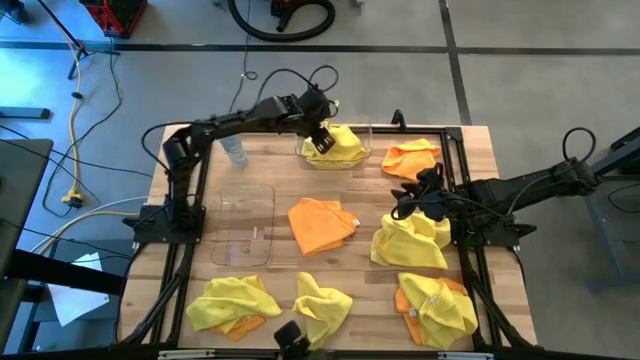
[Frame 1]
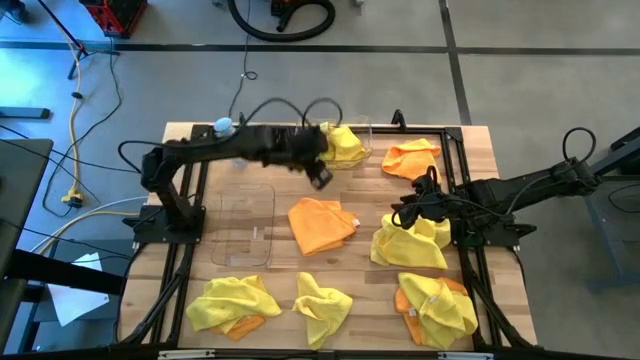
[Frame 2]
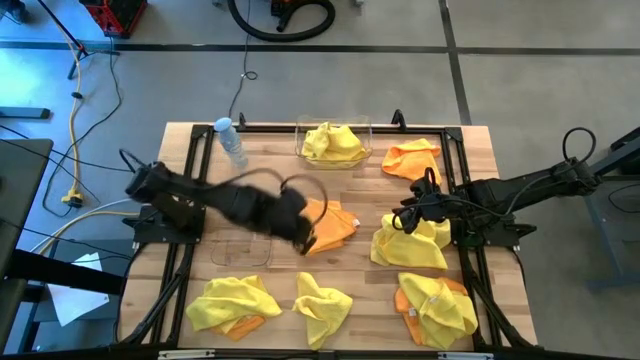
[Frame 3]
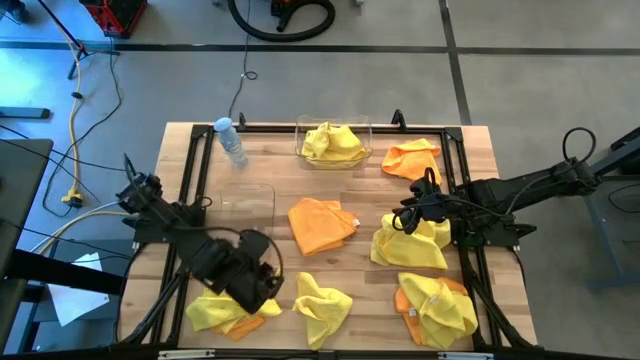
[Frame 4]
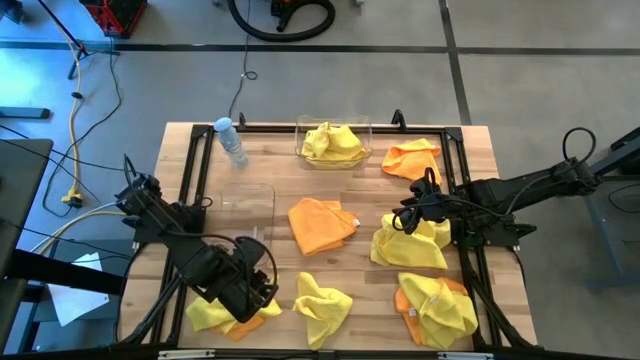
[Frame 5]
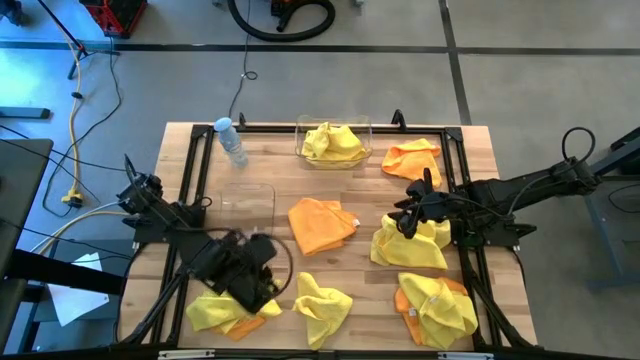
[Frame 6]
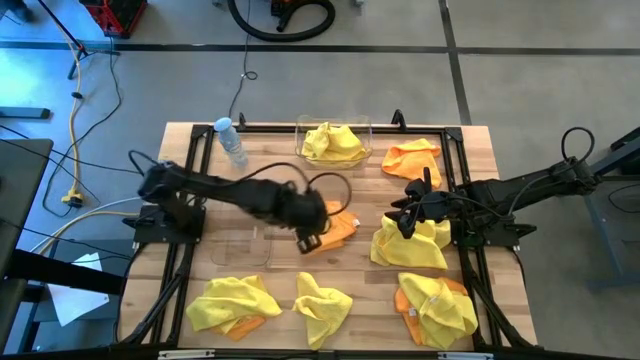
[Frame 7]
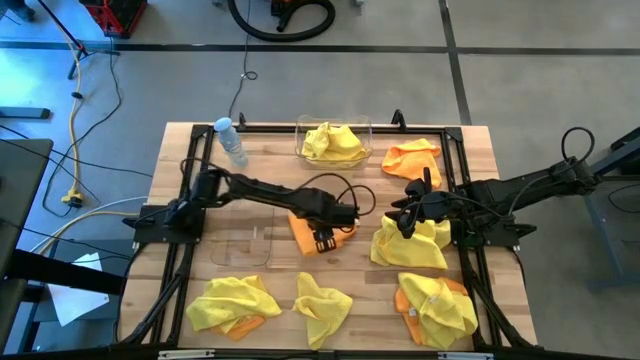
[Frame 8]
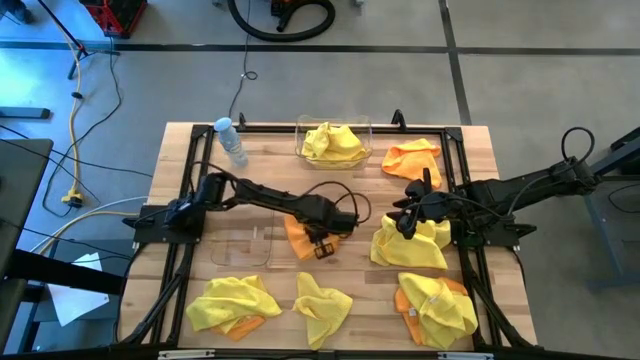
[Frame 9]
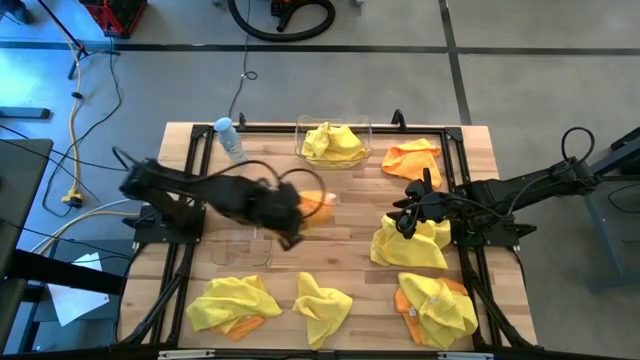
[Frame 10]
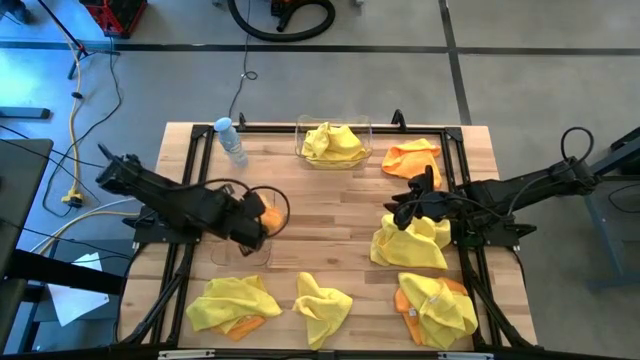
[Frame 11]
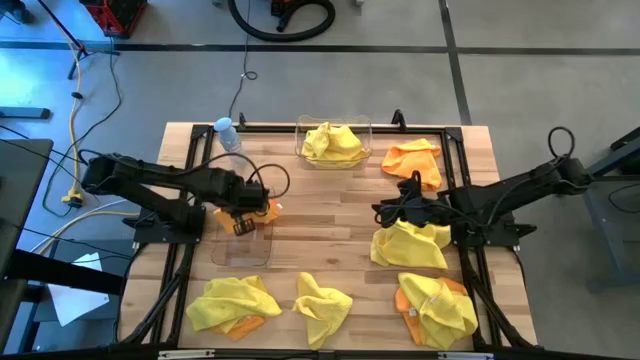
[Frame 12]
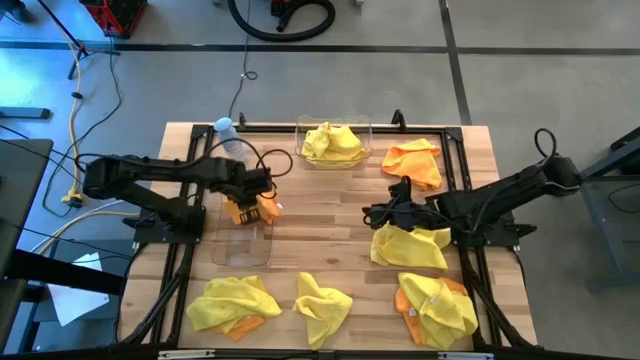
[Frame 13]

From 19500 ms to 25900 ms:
Task: Sort microfiber towel by color & place in baskets
Put the orange microfiber towel into the bottom transparent bin

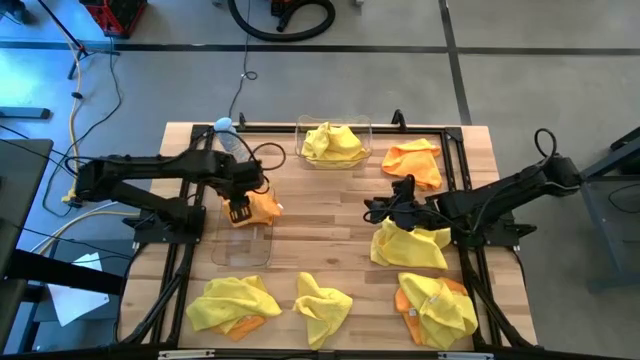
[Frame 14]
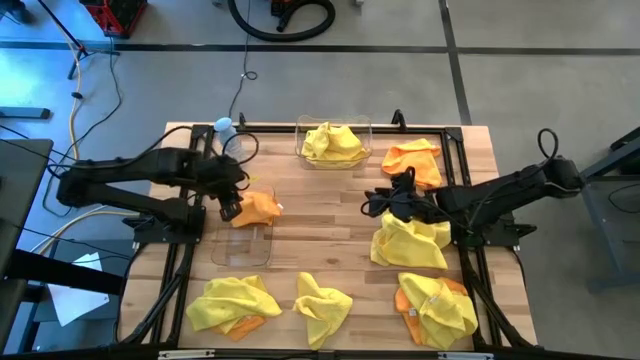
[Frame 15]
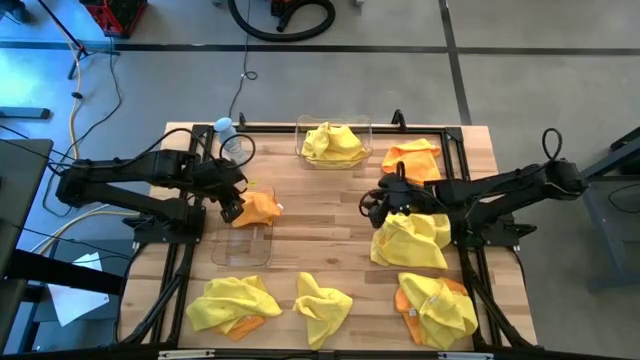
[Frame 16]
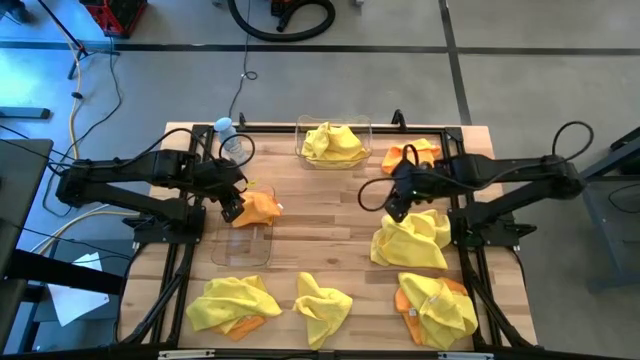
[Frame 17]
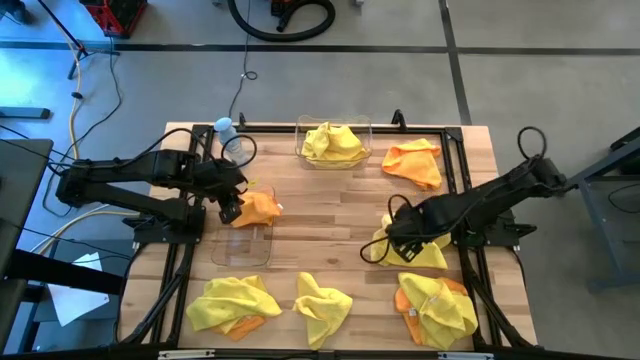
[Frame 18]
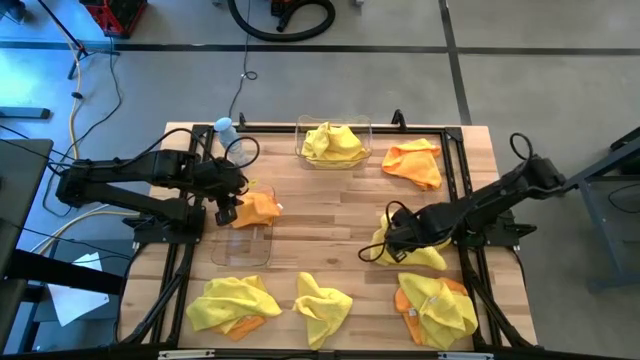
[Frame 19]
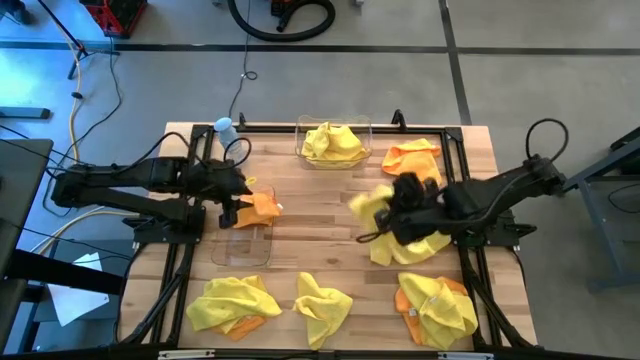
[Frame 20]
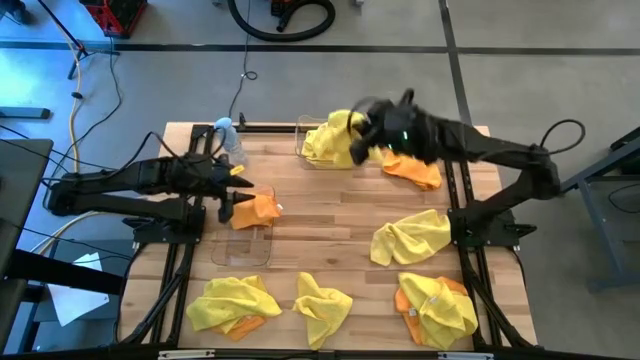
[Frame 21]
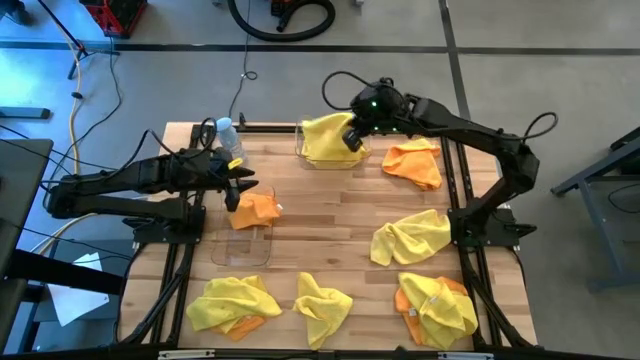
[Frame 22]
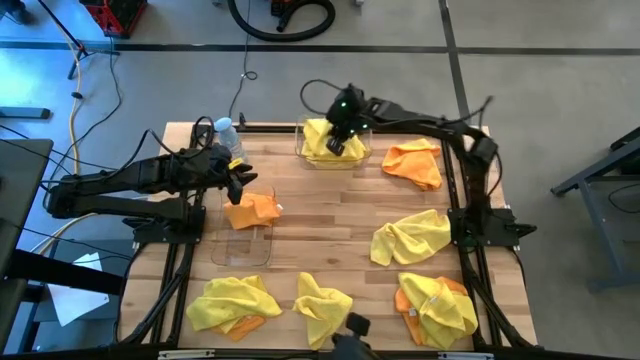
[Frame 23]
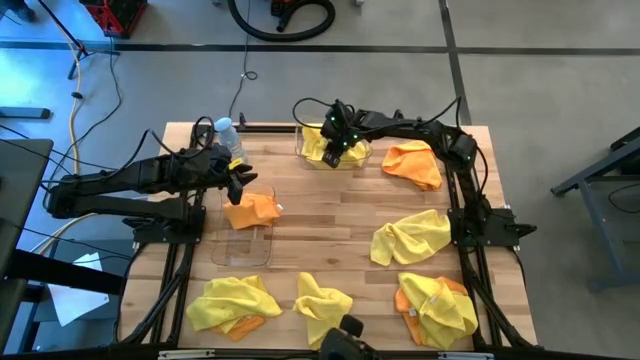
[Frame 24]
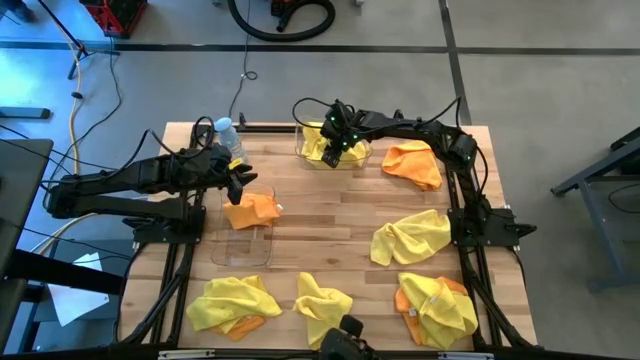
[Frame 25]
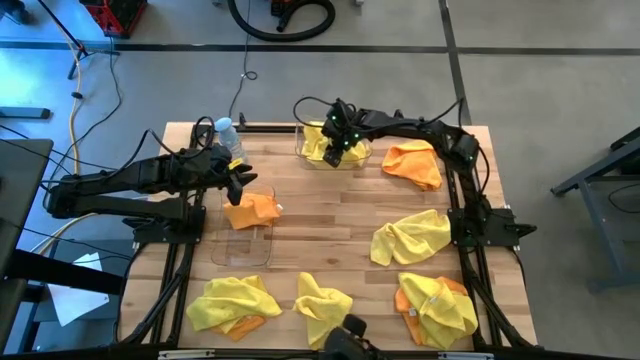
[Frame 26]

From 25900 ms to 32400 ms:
Put the yellow microfiber towel into the top transparent bin

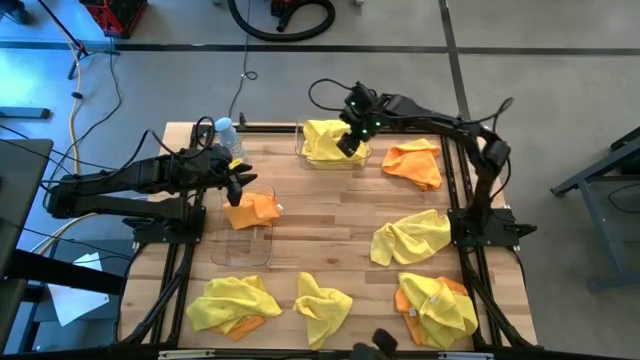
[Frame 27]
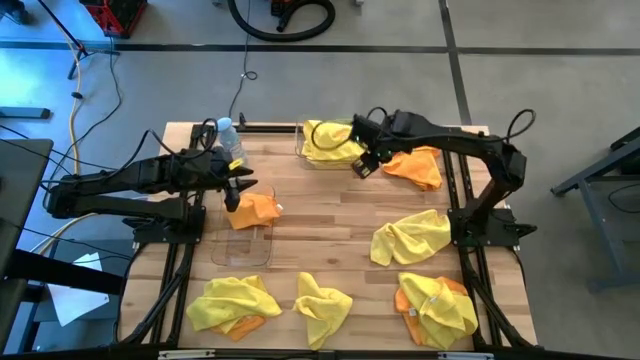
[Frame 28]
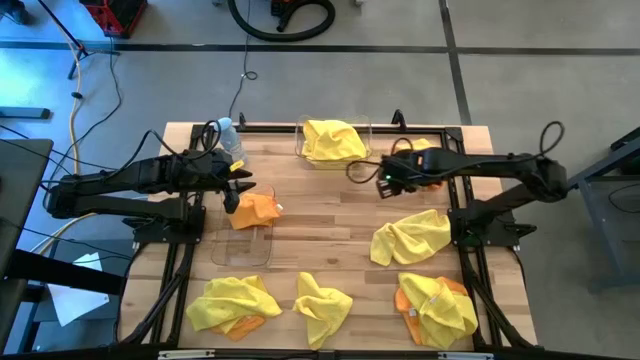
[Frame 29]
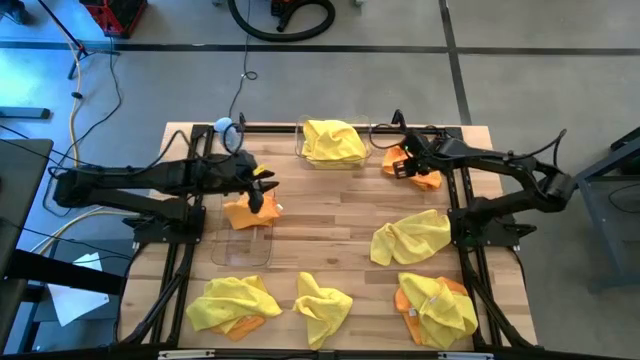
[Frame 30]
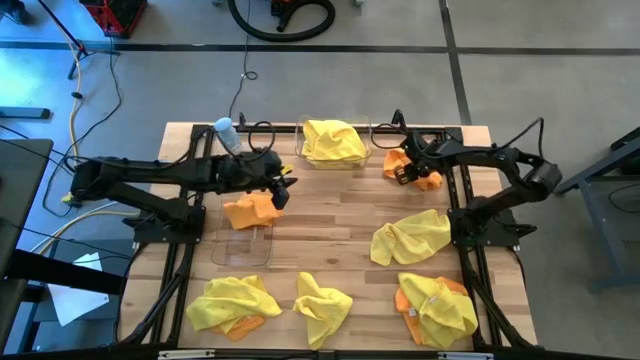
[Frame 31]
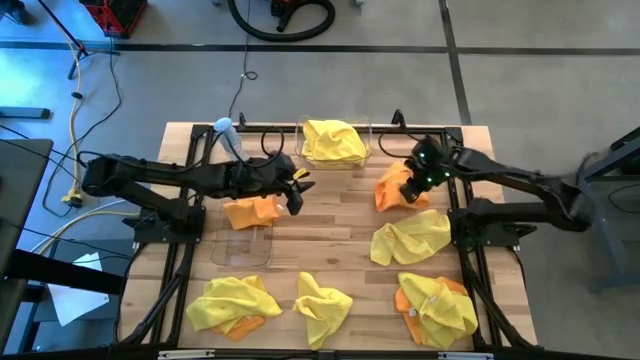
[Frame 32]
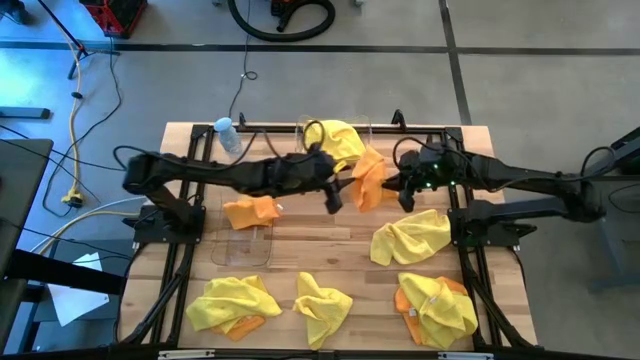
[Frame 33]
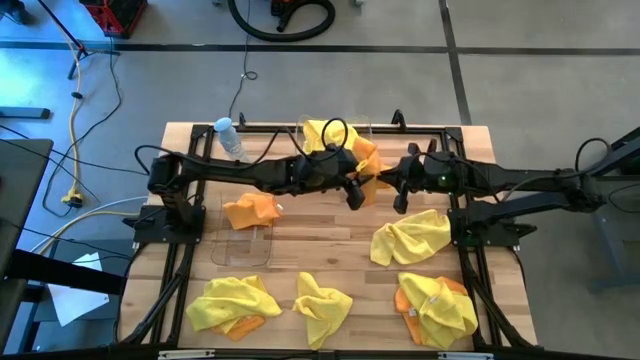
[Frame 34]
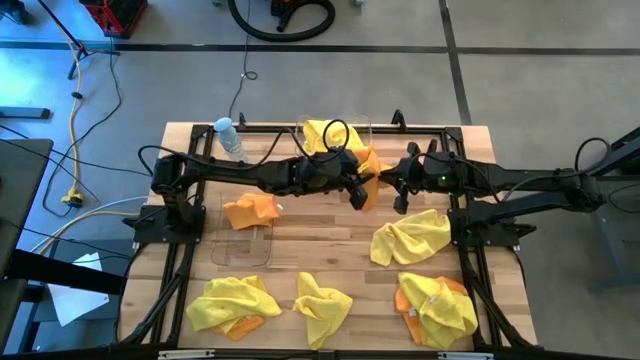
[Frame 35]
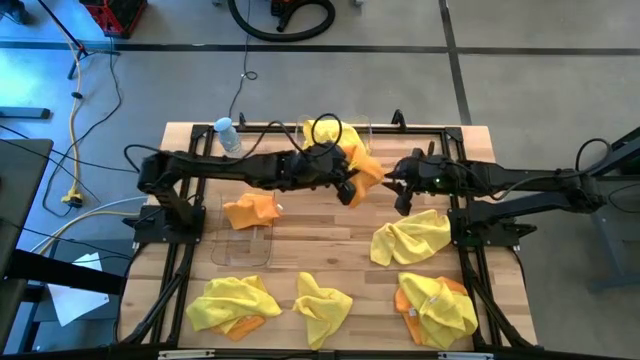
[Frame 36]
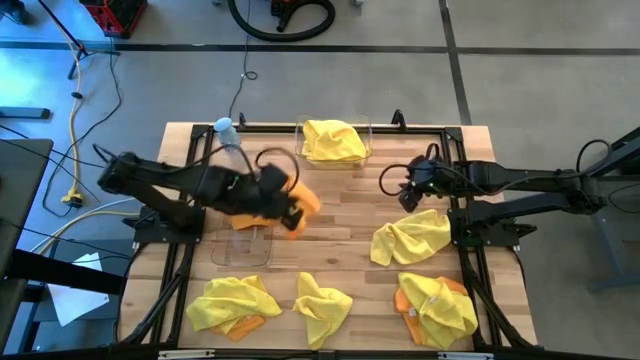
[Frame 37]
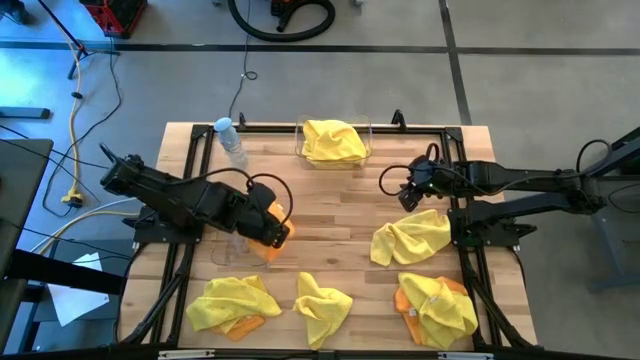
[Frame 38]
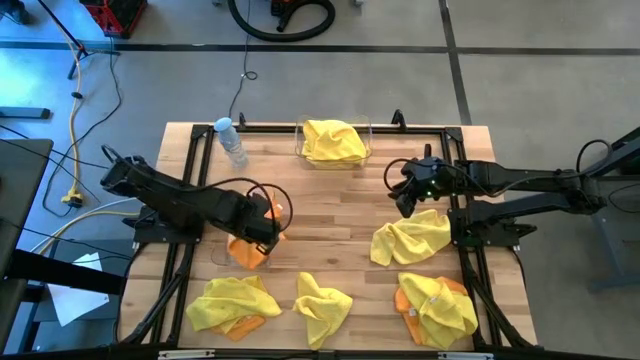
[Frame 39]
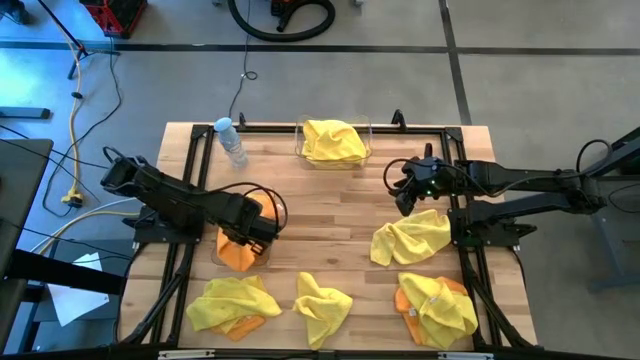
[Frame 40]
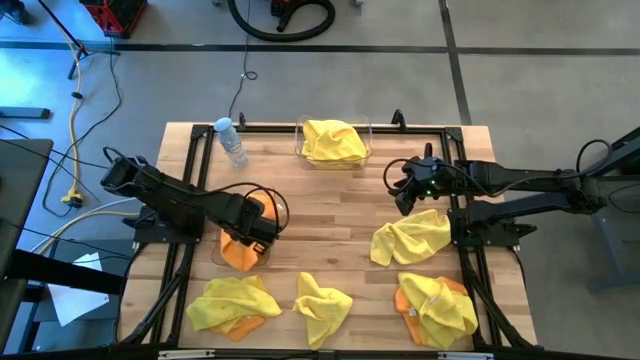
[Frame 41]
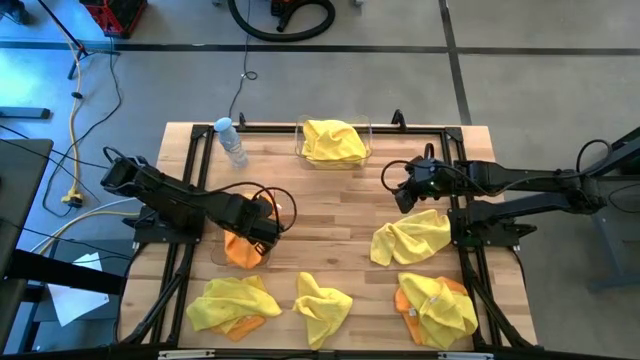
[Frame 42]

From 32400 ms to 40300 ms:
Put the orange microfiber towel into the bottom transparent bin
